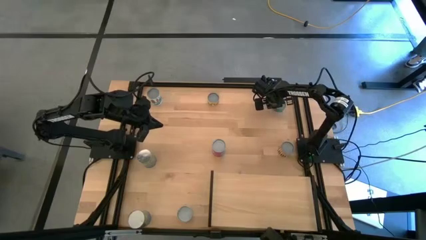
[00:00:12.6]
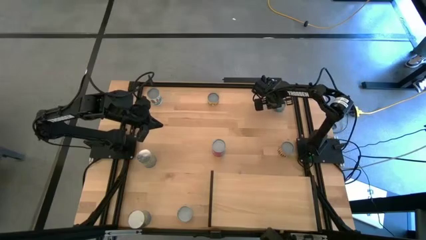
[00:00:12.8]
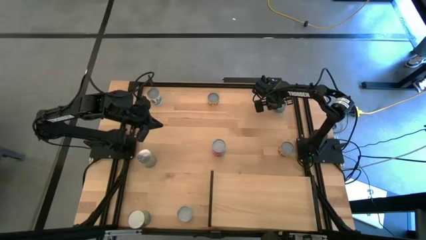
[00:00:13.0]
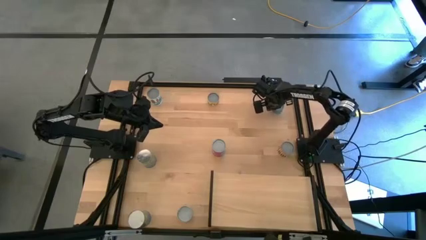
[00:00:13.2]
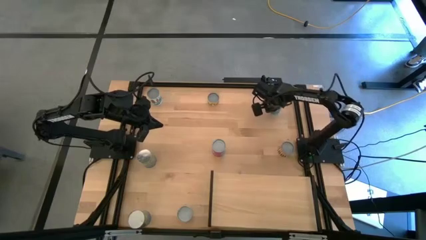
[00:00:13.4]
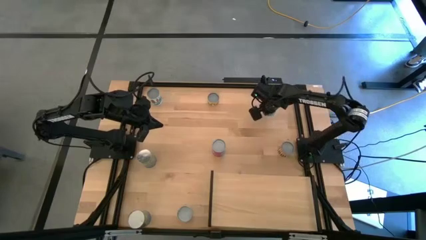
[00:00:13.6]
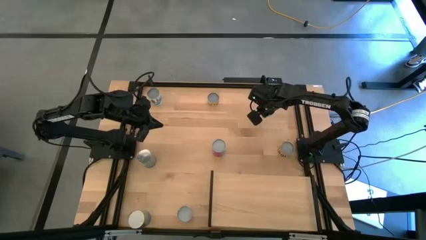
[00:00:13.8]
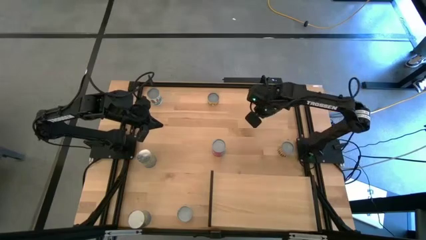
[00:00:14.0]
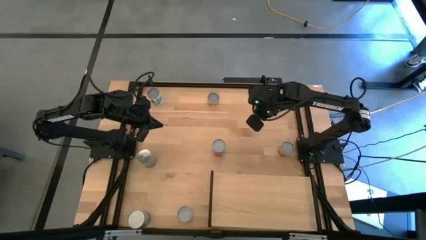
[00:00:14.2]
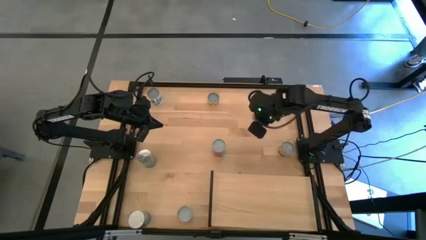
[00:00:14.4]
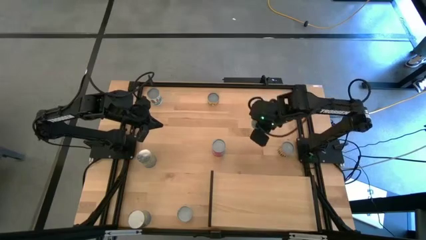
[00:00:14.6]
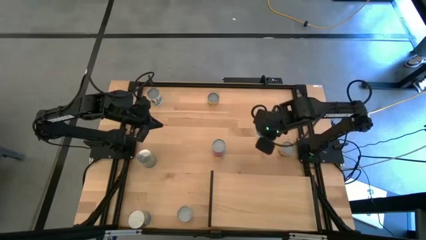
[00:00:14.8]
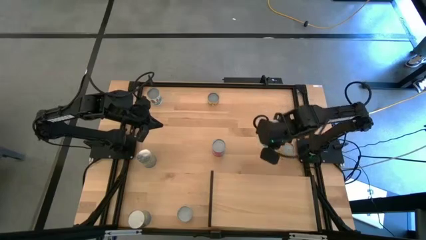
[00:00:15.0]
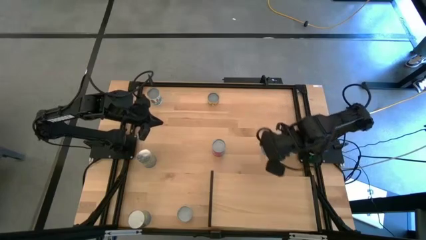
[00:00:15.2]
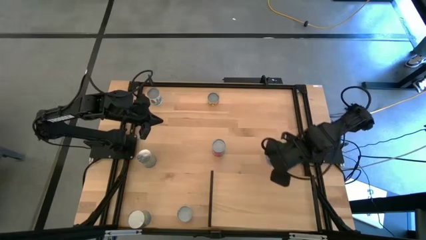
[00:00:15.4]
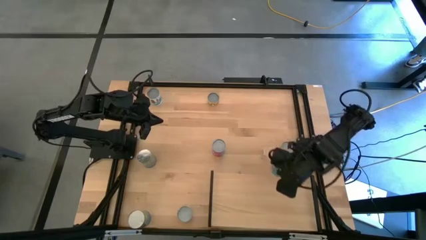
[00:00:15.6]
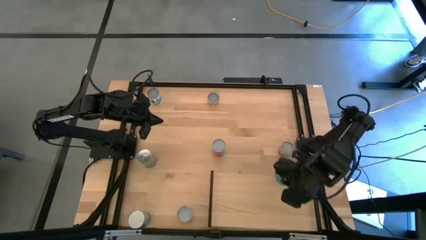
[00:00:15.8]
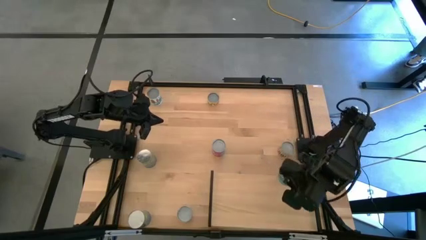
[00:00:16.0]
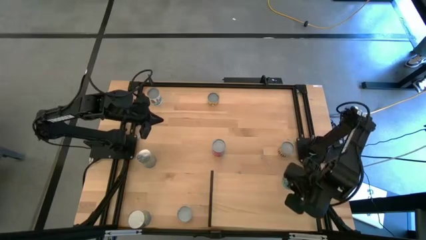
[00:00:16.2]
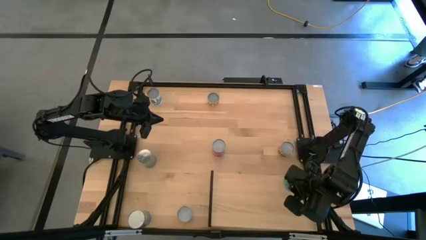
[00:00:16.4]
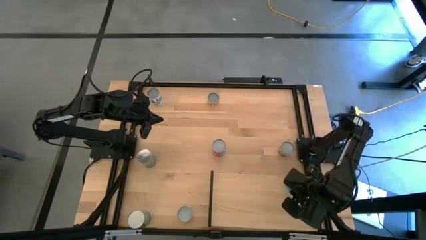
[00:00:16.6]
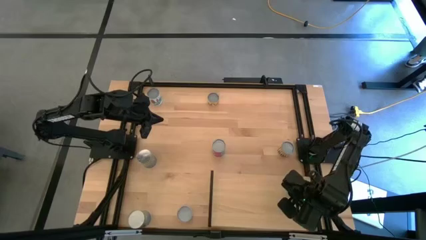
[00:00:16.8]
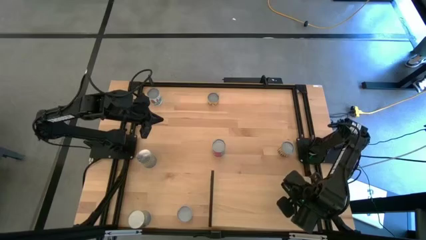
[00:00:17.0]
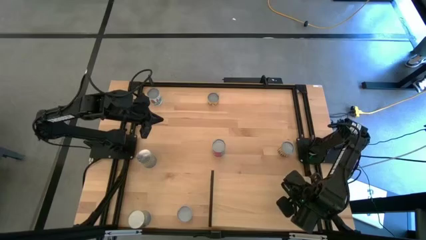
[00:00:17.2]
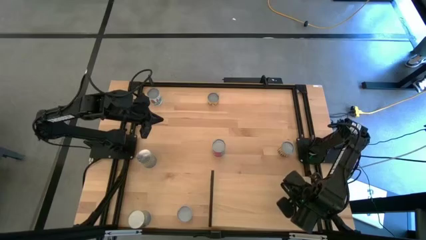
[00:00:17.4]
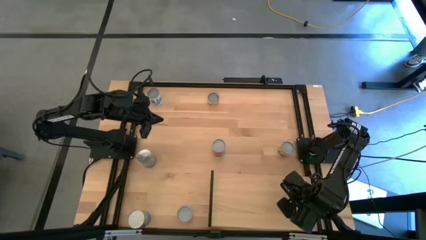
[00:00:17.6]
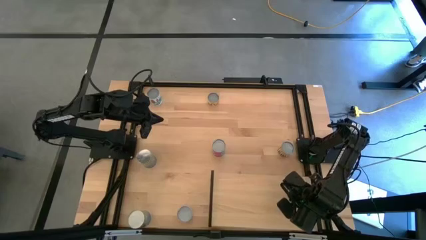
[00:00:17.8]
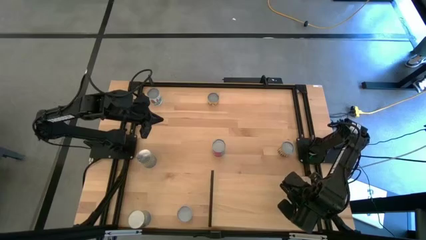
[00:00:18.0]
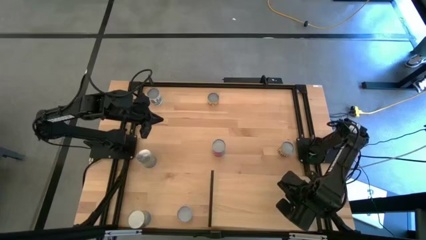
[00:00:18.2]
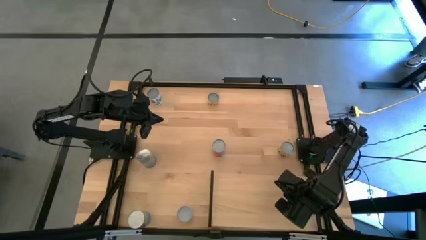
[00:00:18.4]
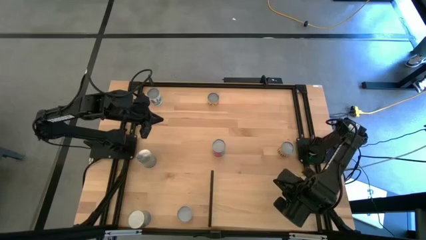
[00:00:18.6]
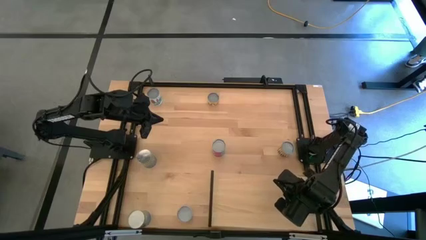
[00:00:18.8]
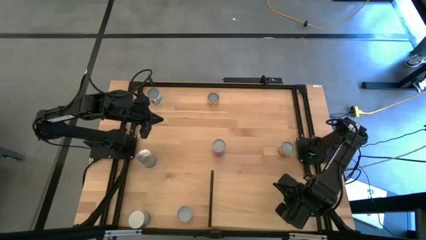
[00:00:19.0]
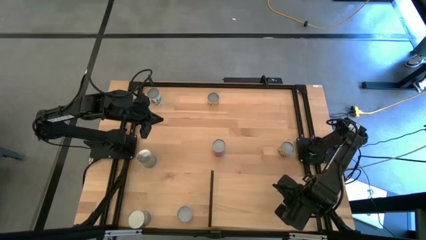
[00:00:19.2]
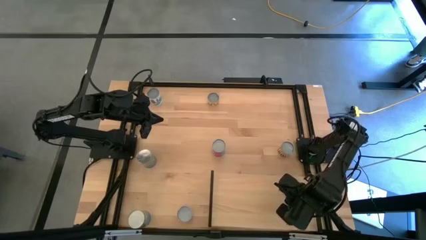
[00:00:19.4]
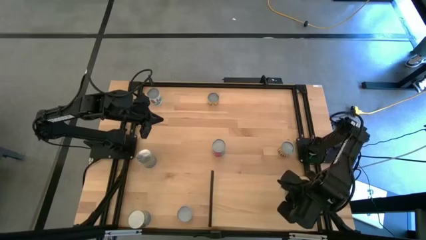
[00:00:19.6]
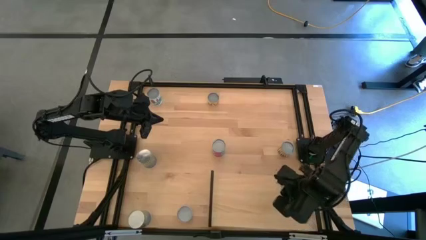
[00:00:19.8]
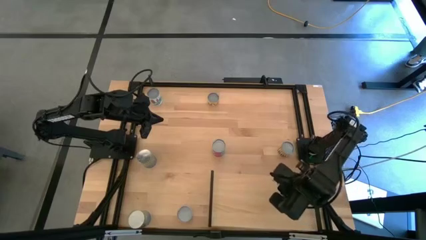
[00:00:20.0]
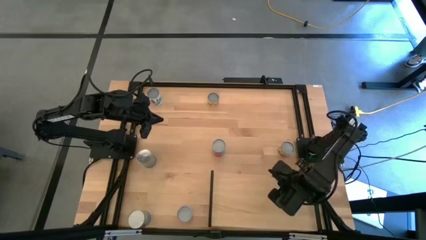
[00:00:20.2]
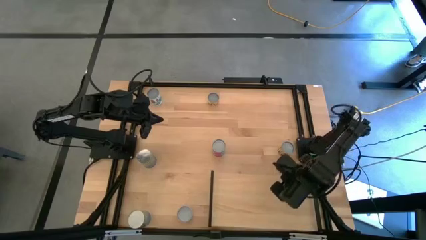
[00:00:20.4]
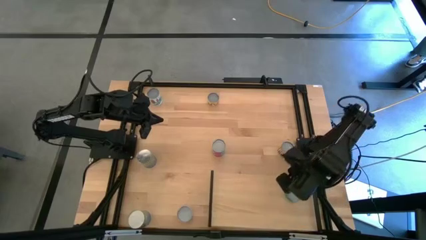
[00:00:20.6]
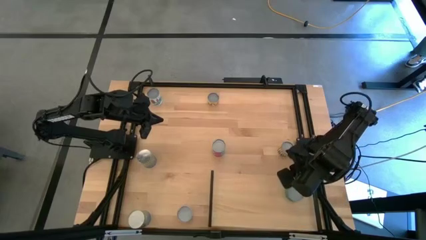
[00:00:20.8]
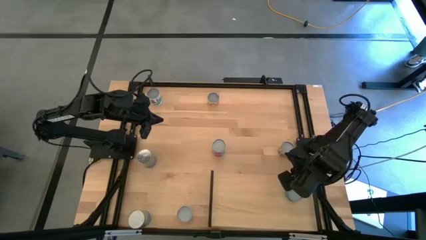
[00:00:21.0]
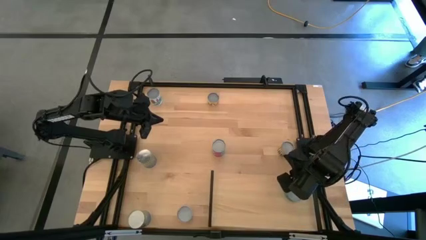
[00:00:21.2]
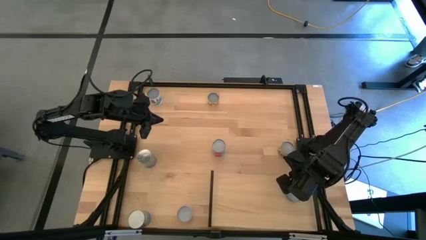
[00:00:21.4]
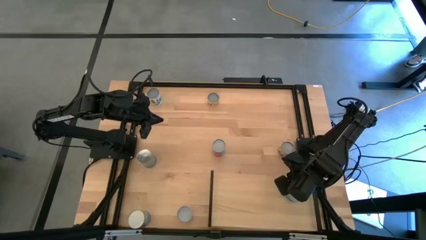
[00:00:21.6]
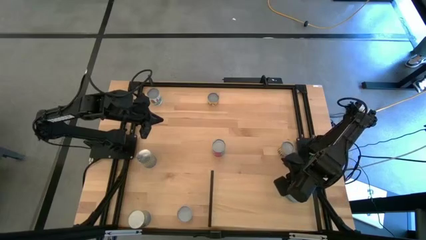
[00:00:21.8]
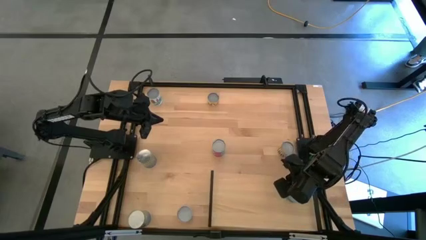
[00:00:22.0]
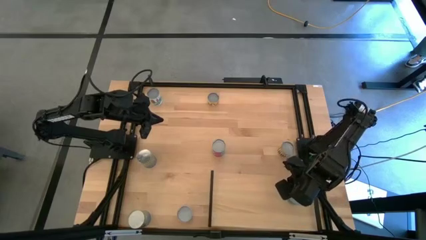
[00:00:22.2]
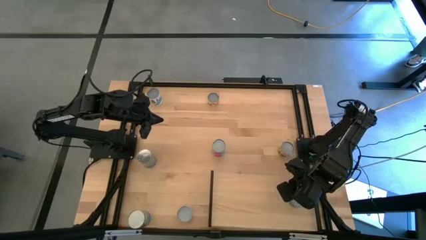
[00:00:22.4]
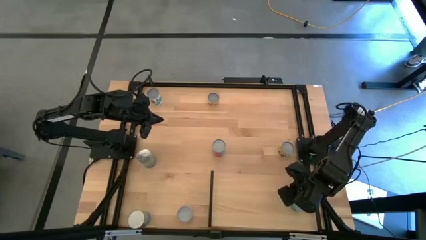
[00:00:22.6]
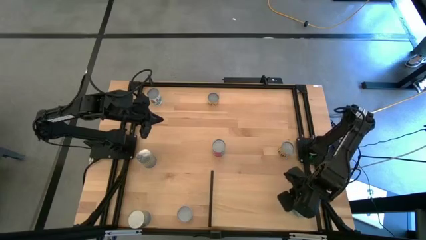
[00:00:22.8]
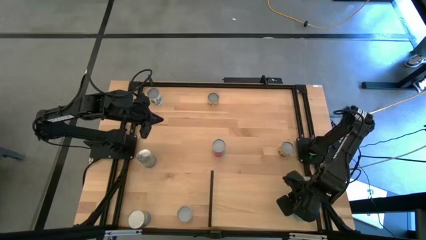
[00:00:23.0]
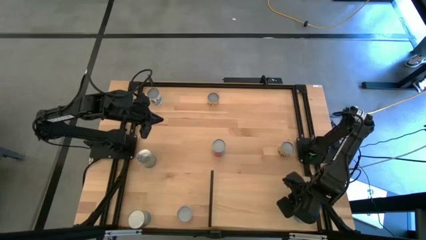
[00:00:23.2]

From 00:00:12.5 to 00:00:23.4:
Task: Pick and place cans onto a shelf
Put the canned tuna on the shelf
